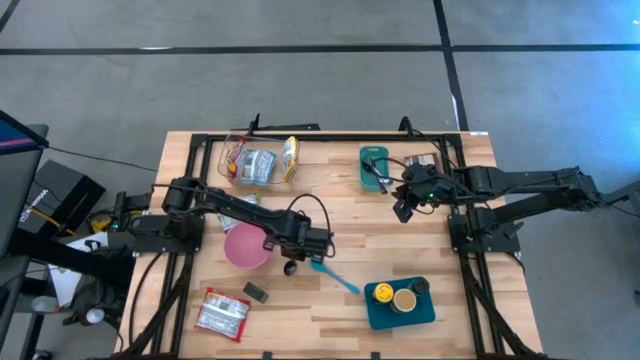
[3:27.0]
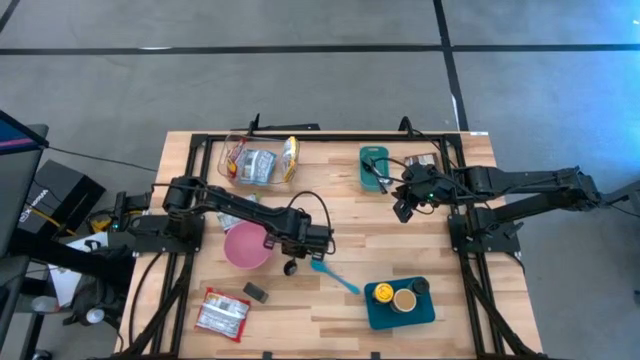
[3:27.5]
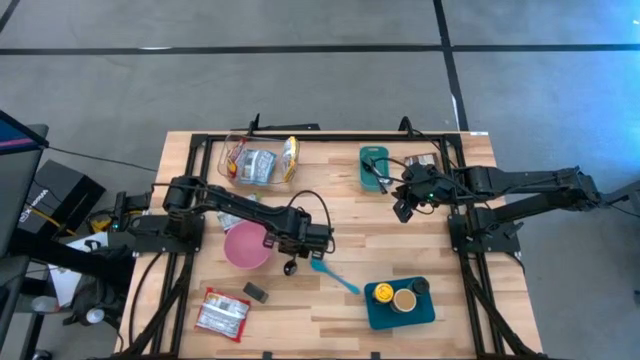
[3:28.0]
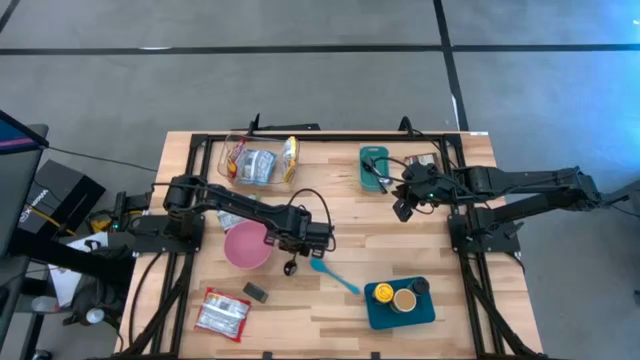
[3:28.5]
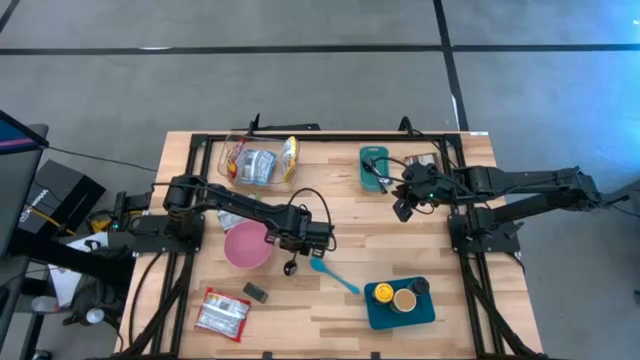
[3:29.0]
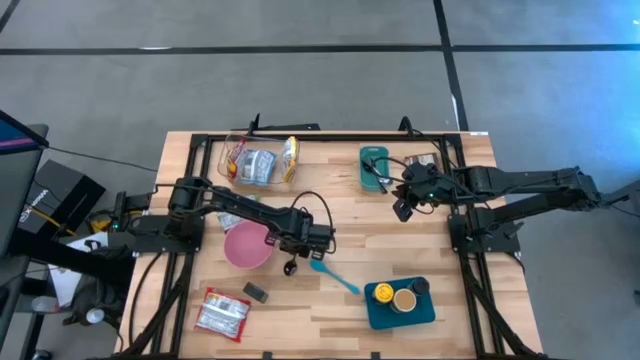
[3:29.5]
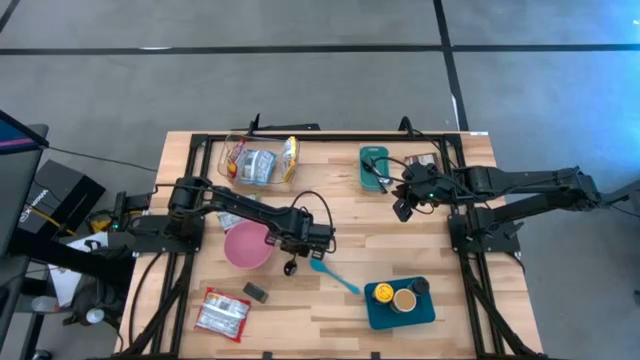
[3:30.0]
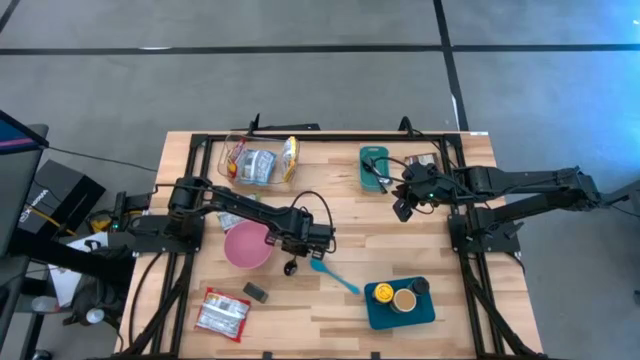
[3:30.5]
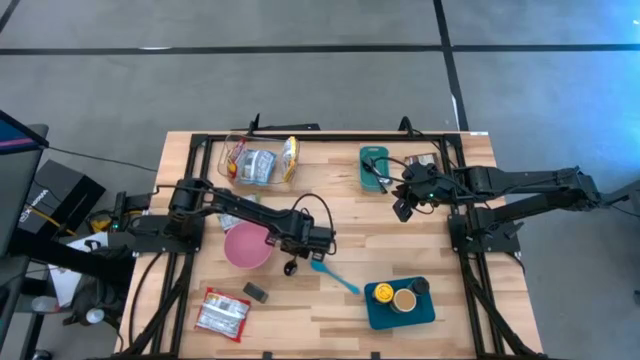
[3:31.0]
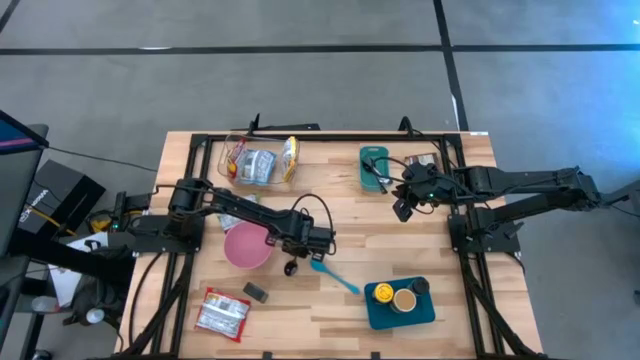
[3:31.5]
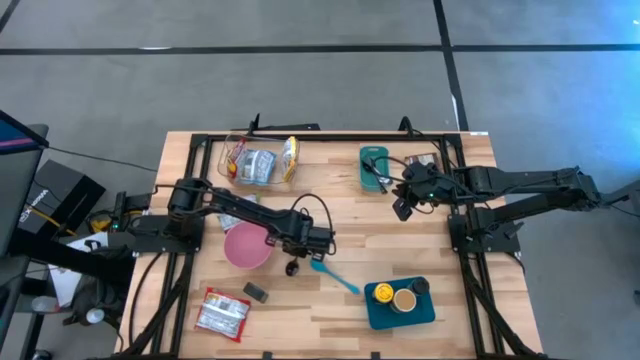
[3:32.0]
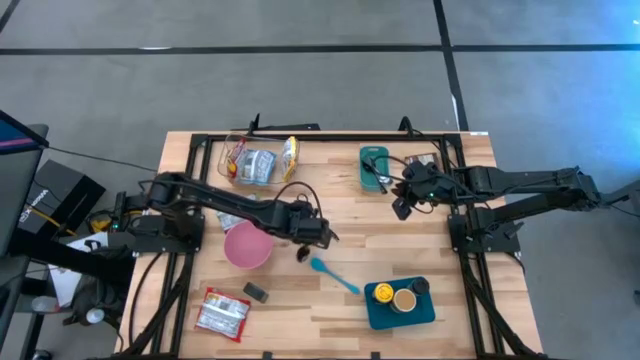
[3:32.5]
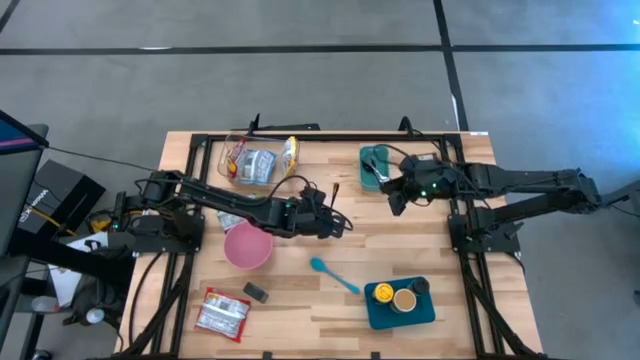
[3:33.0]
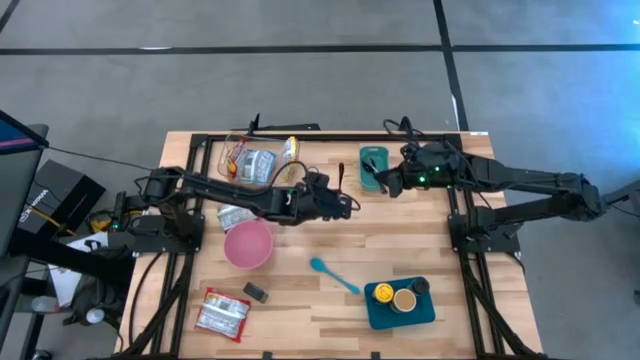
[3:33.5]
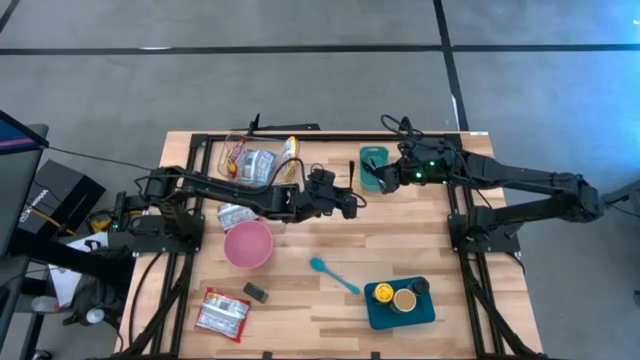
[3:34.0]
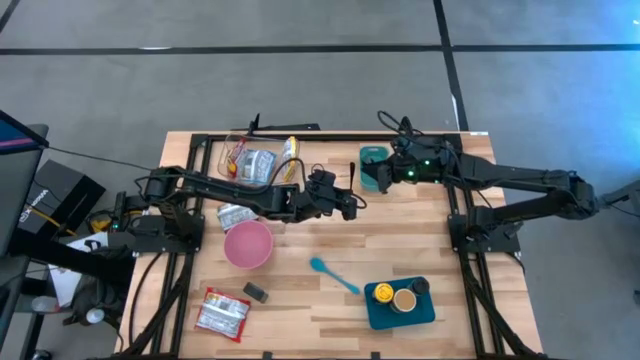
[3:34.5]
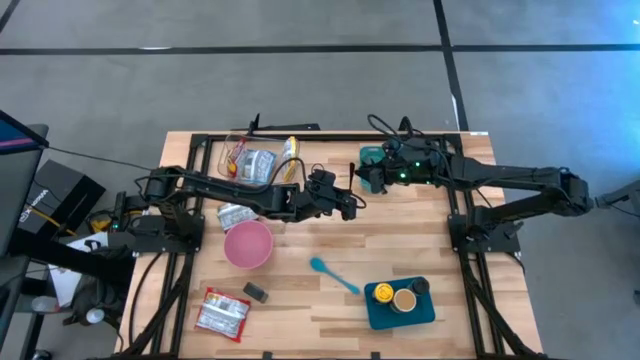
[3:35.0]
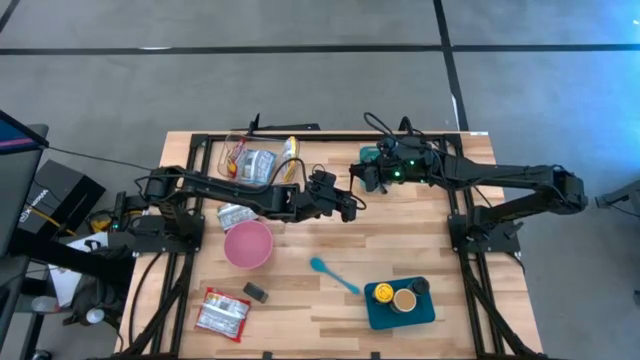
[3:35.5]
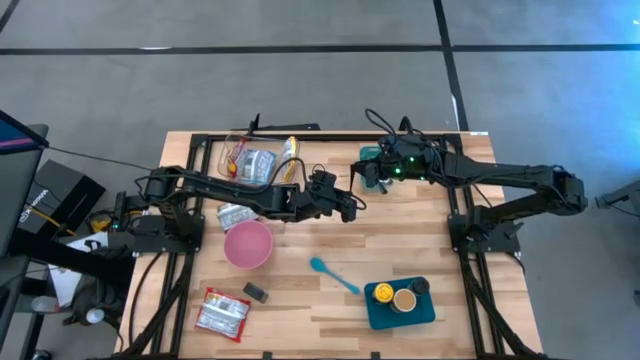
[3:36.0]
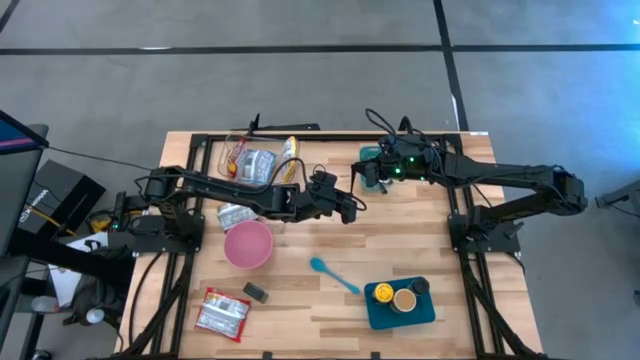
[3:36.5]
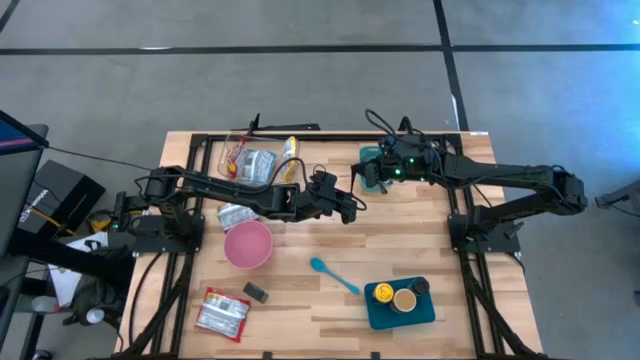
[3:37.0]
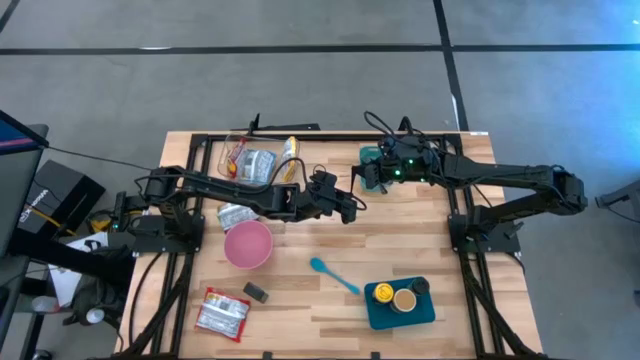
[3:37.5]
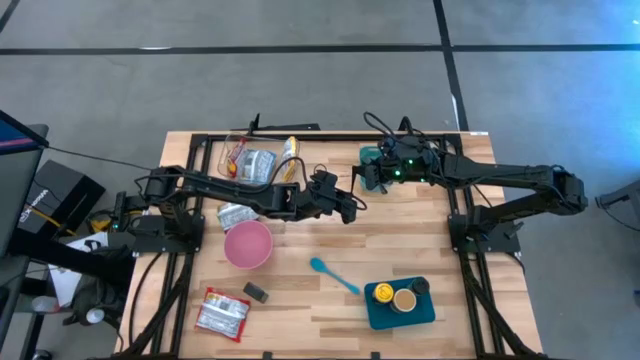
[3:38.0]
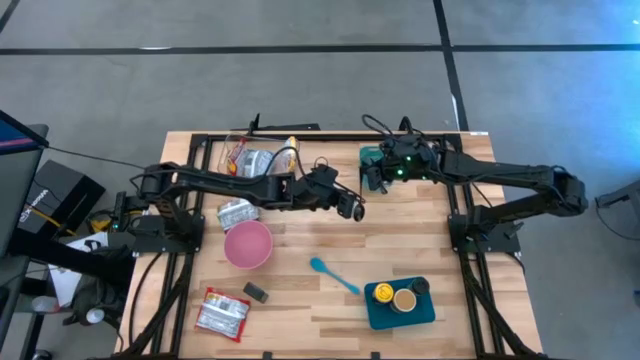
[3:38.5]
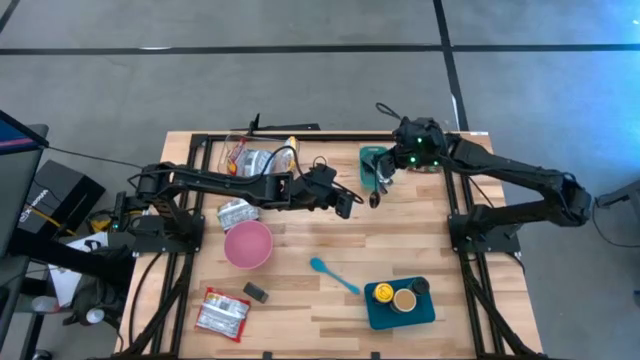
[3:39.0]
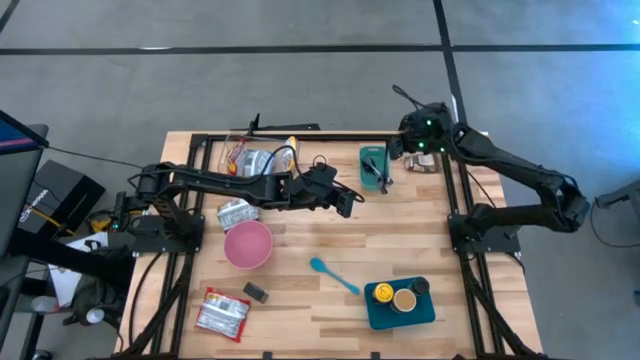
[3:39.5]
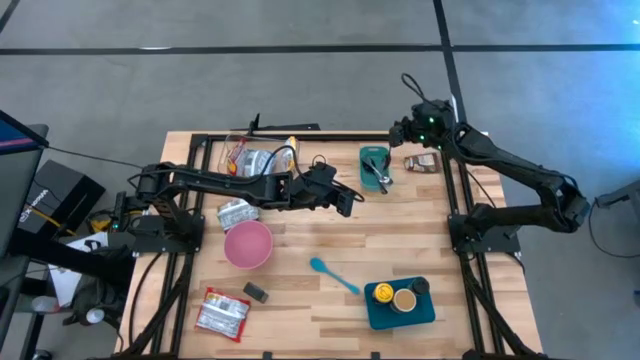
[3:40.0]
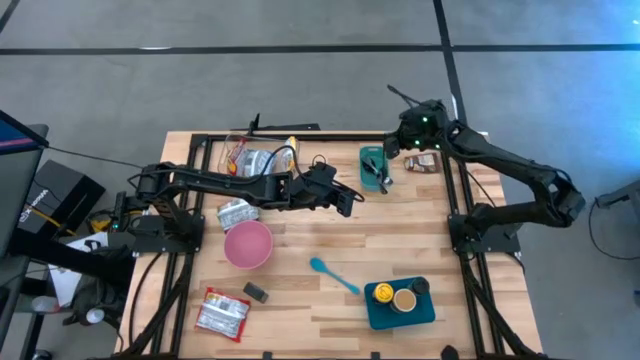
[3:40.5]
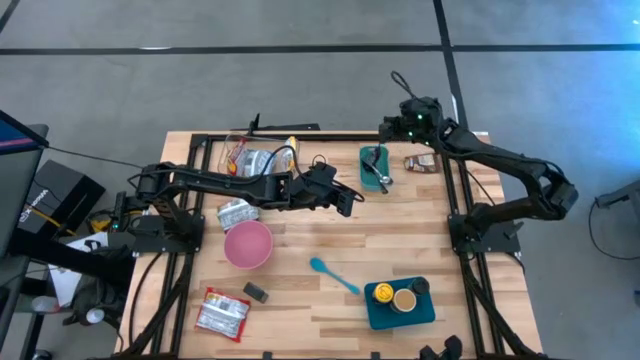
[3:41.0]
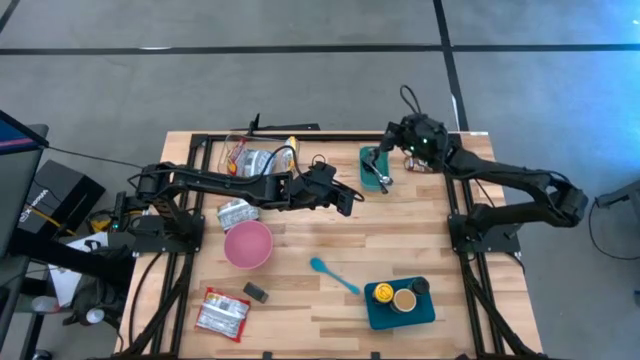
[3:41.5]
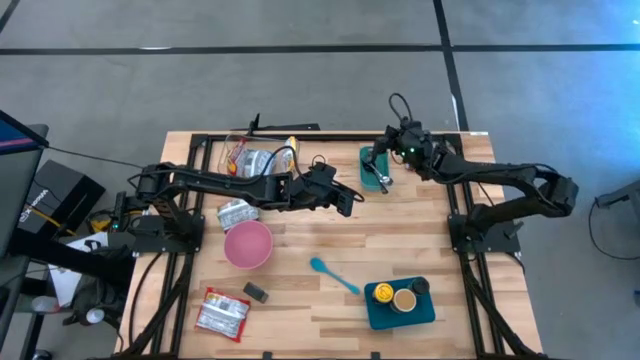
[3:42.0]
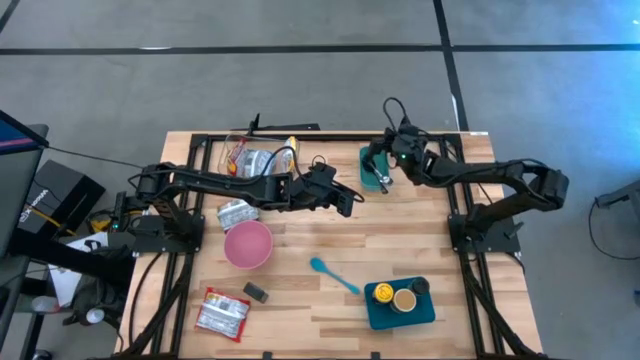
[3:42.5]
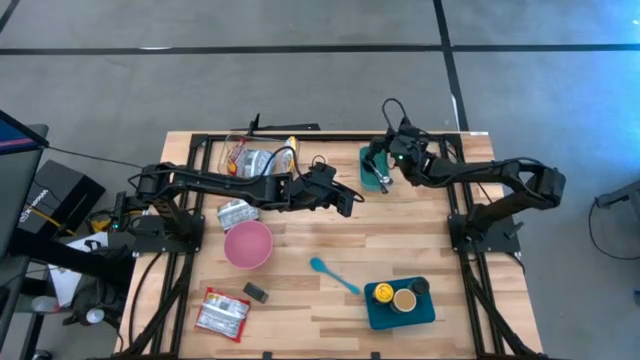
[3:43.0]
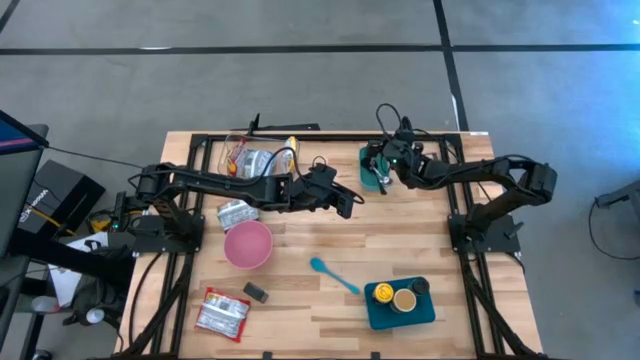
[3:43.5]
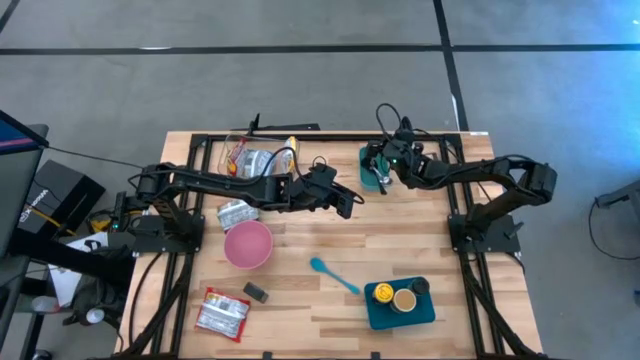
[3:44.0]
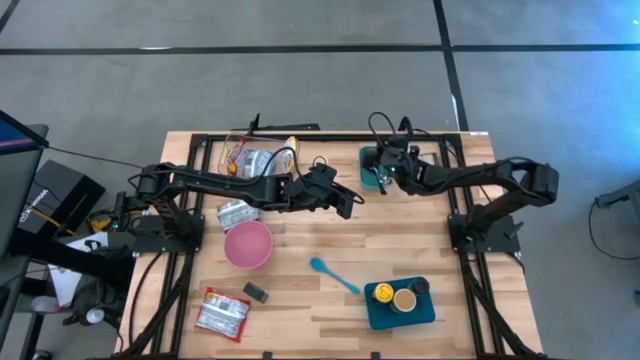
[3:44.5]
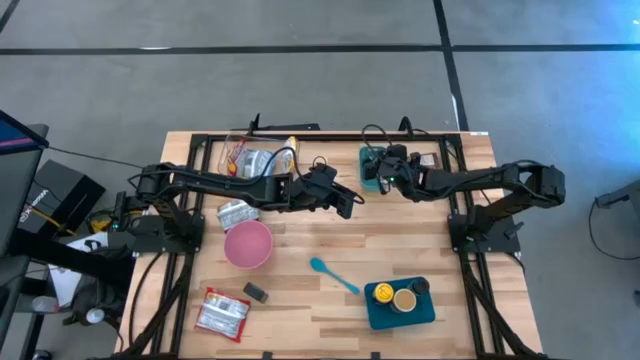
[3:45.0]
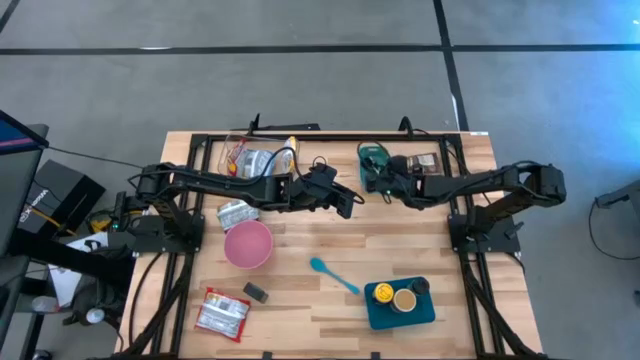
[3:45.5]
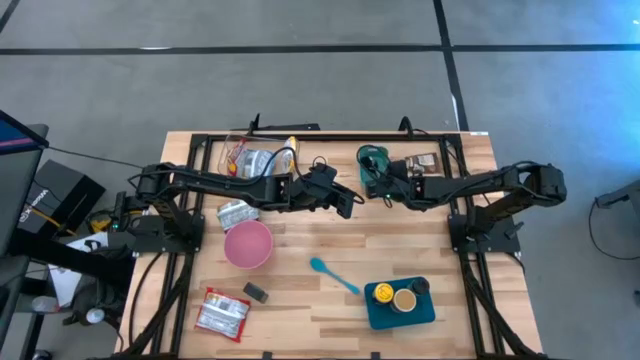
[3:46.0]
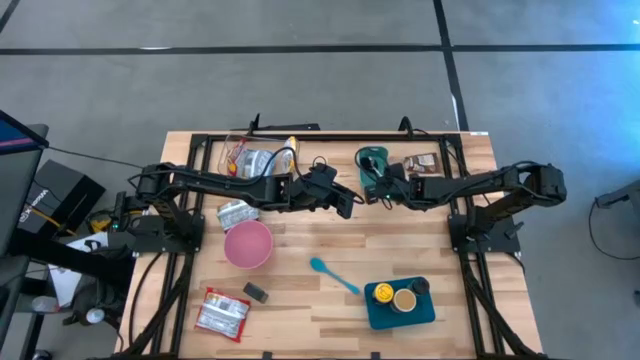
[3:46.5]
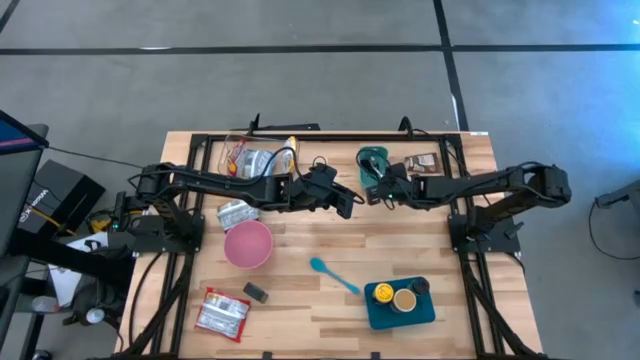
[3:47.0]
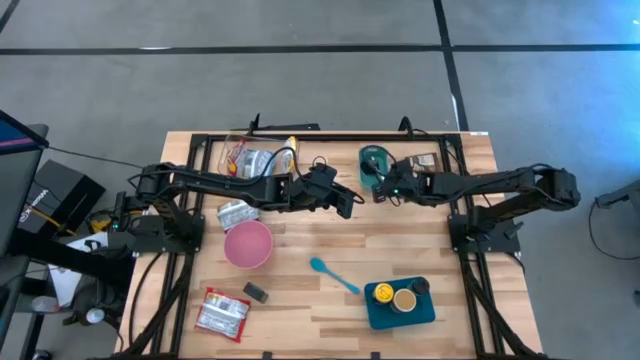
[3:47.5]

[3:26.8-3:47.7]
Task: Pick & Place Food Item
Put the black spoon into the green bin
